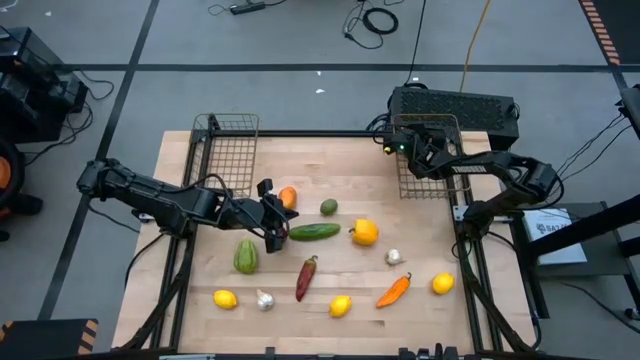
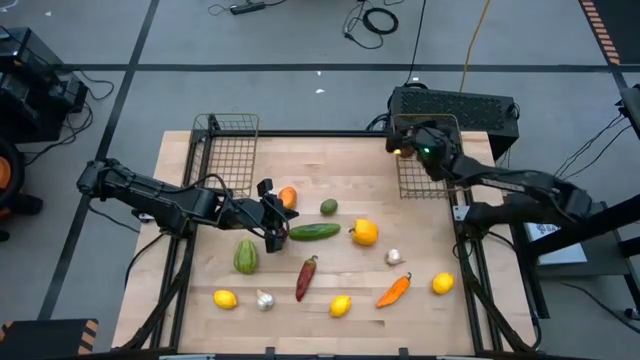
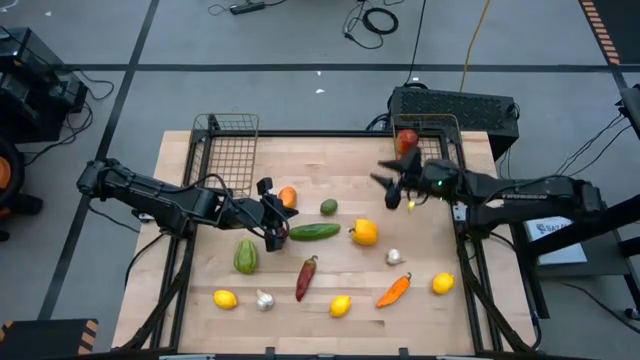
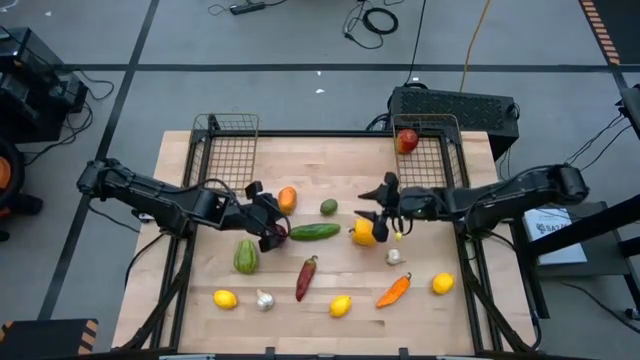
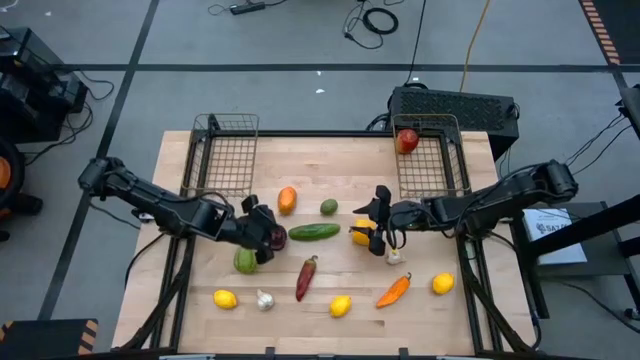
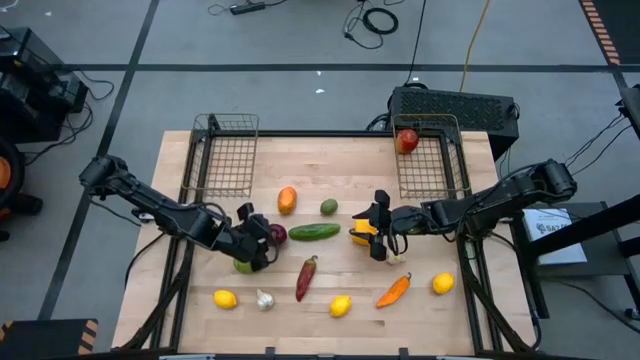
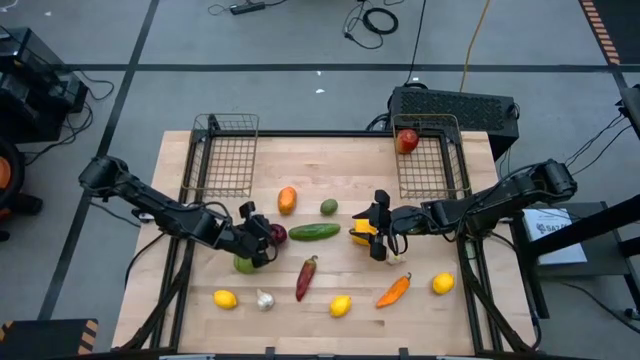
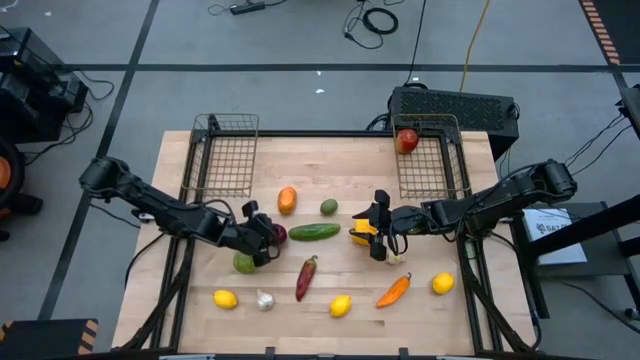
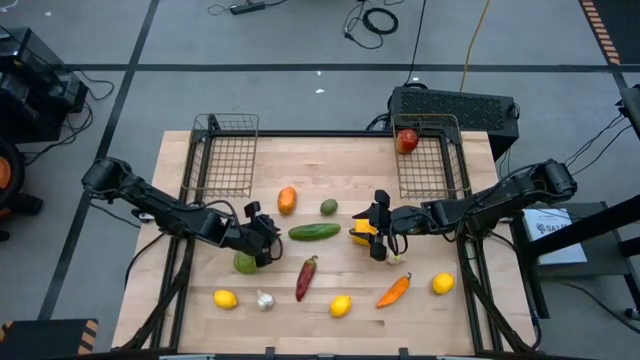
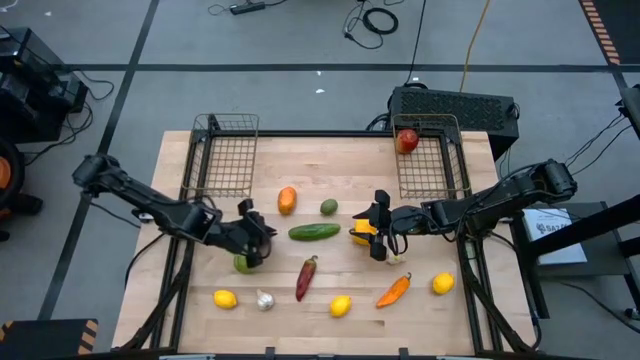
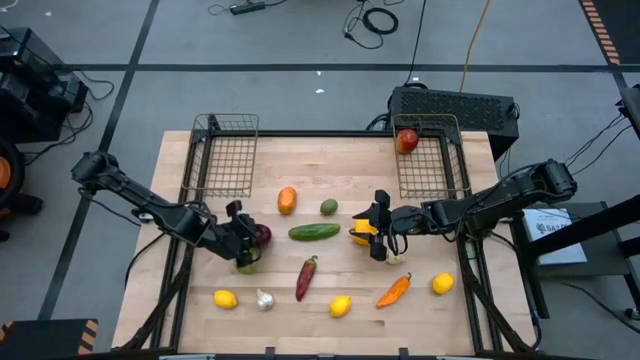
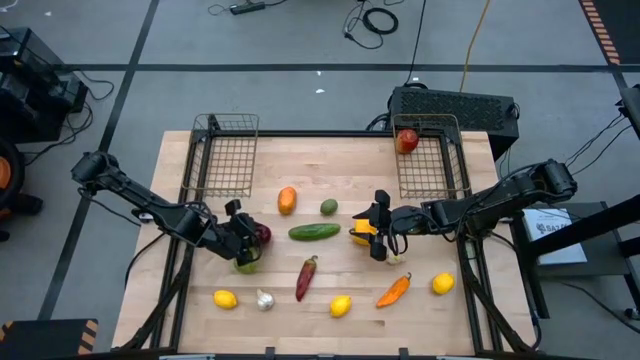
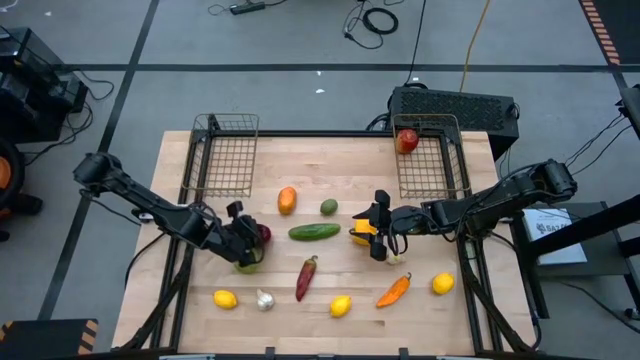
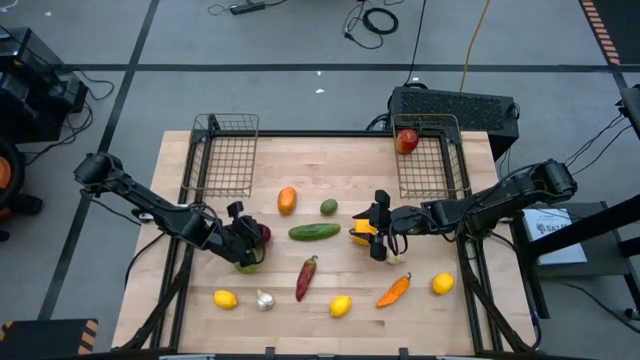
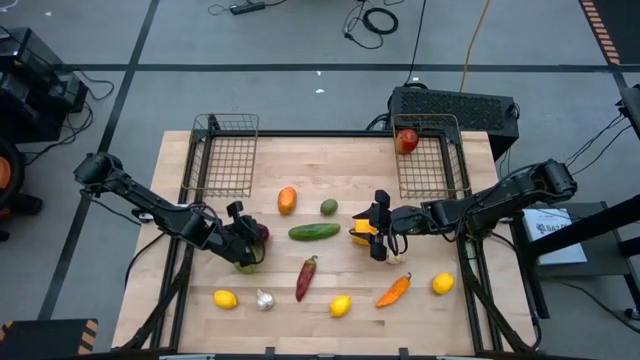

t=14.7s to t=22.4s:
Task: Sort produce into baskets
Put the left red apple into the right wire basket

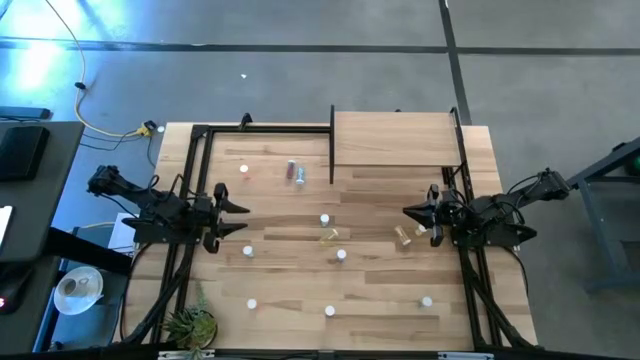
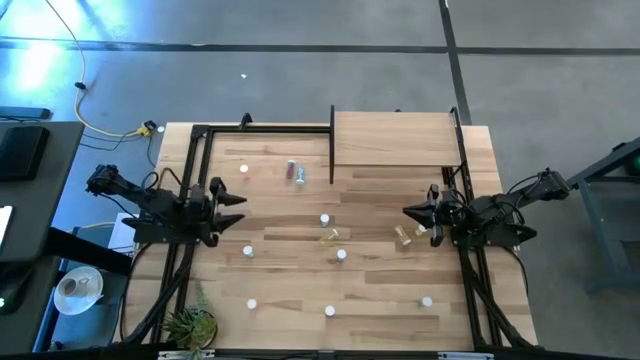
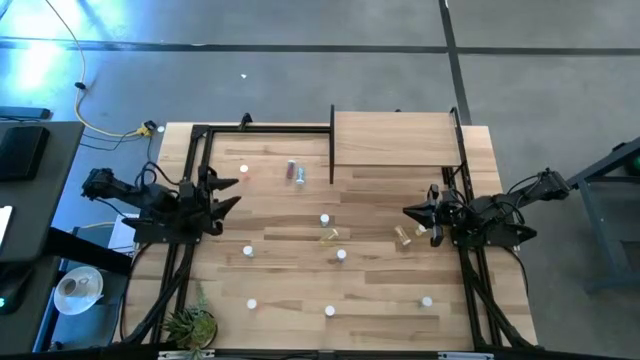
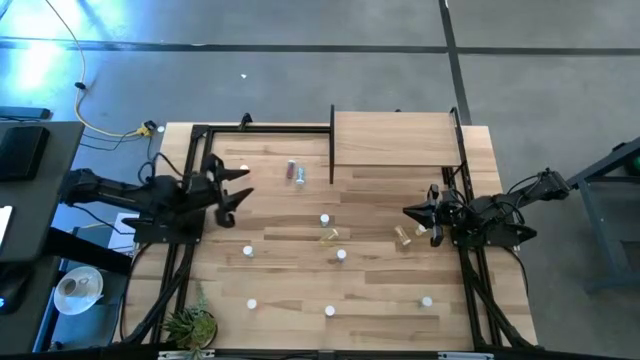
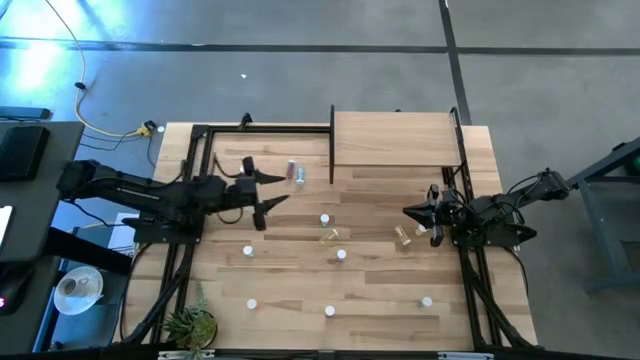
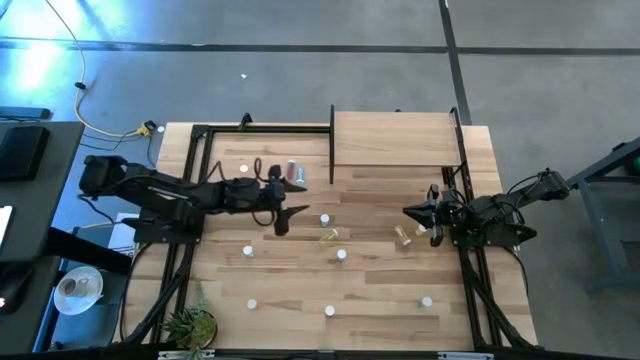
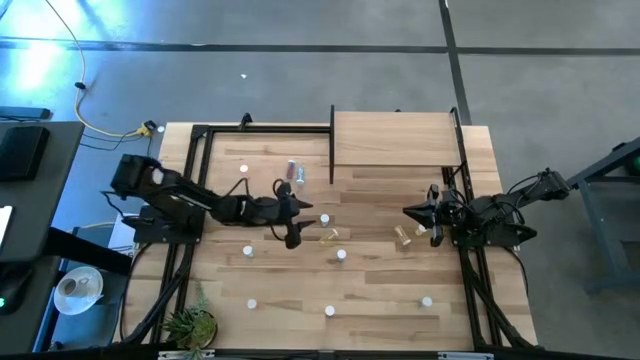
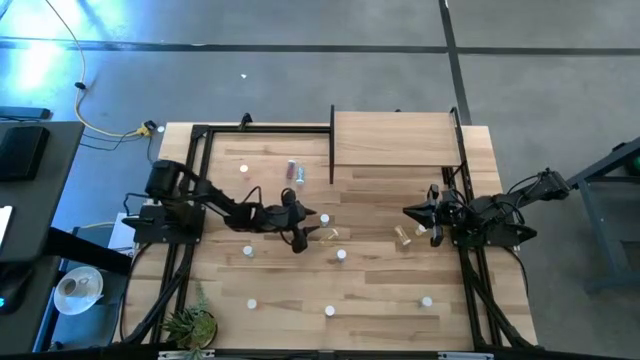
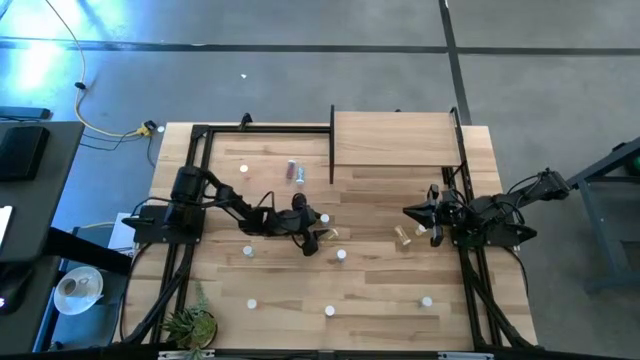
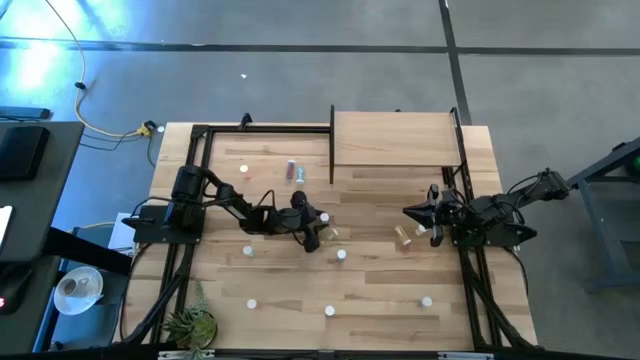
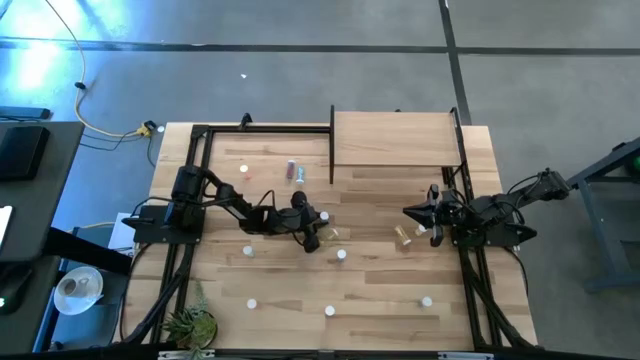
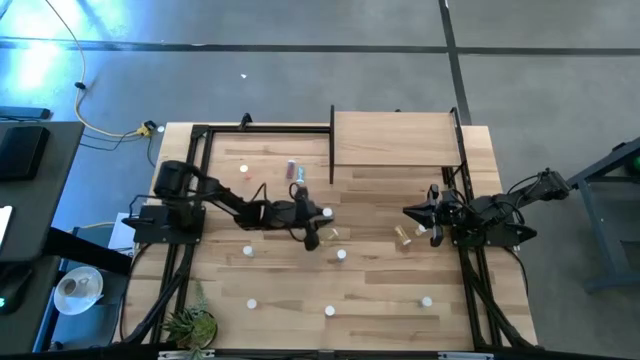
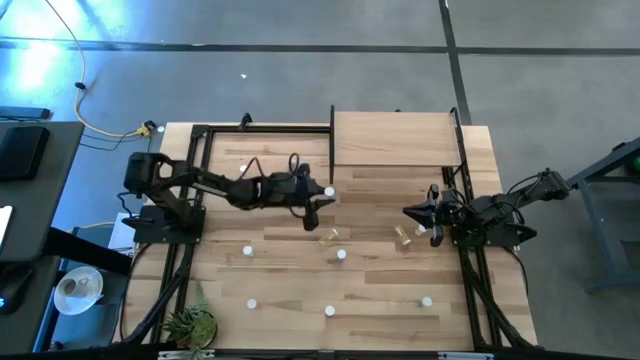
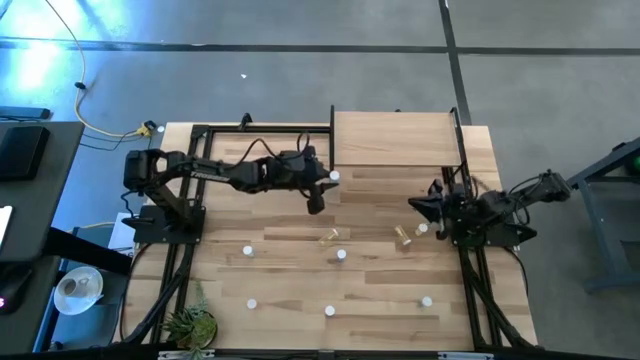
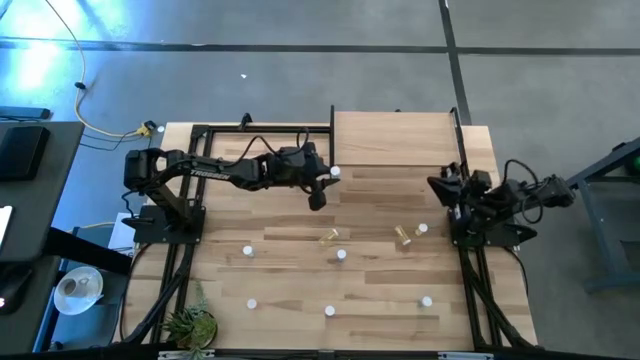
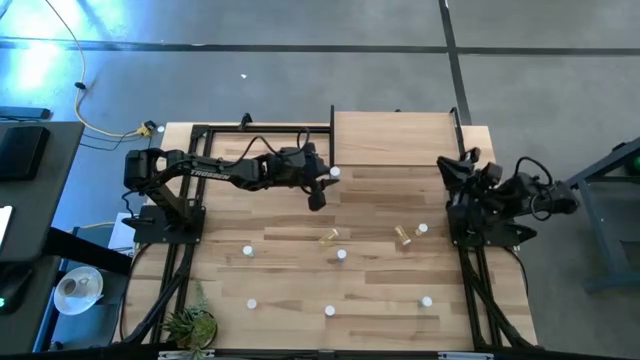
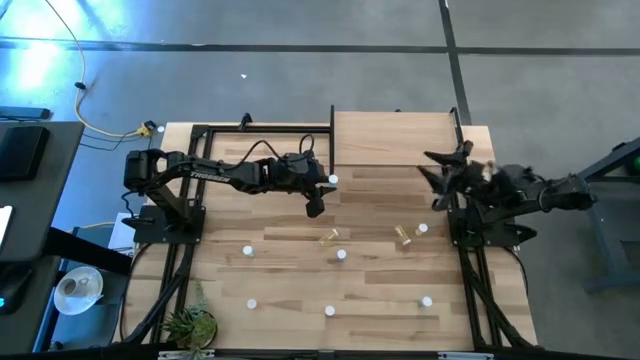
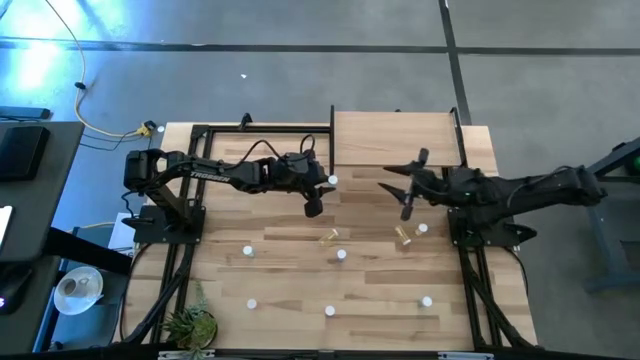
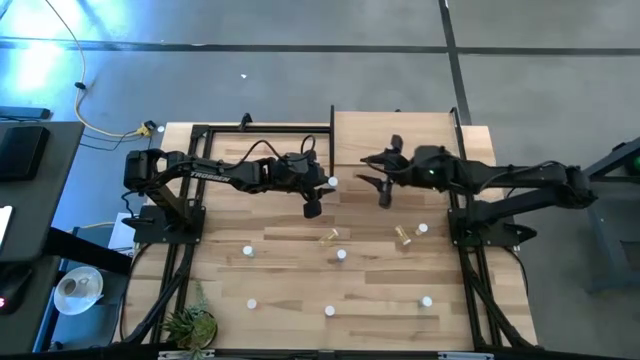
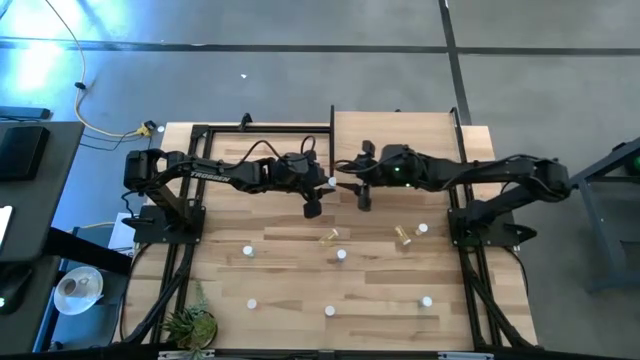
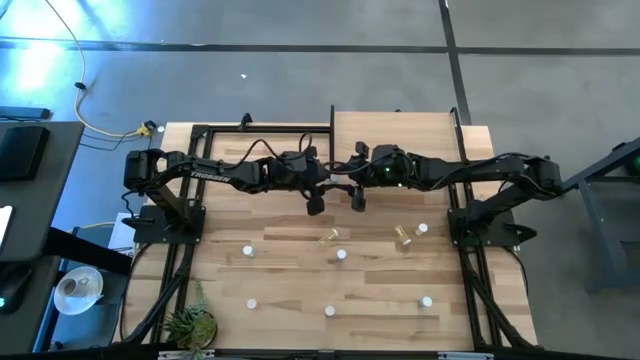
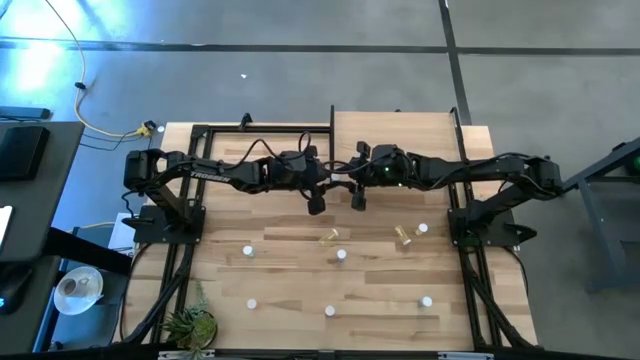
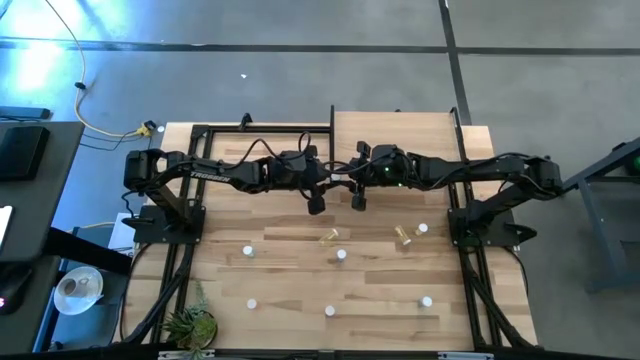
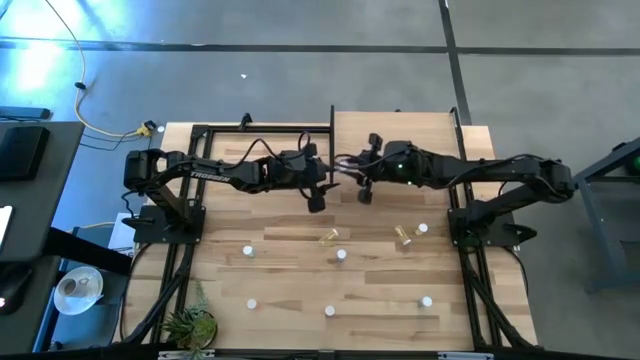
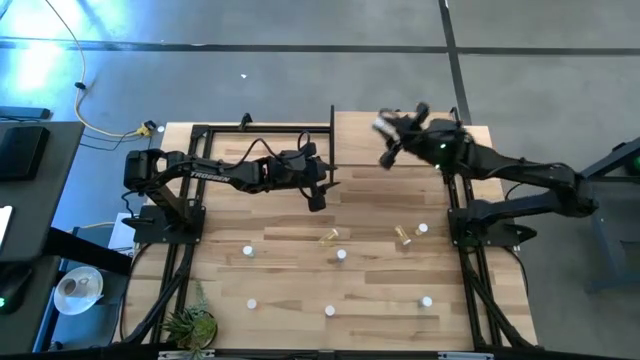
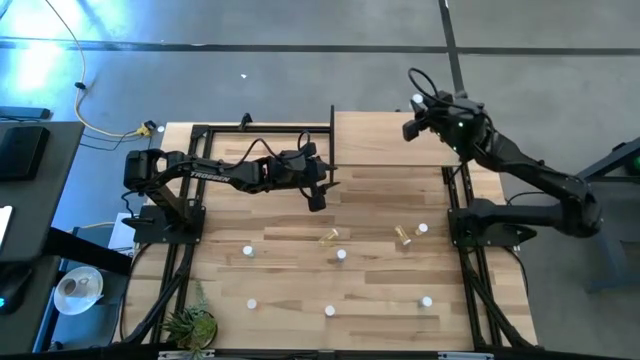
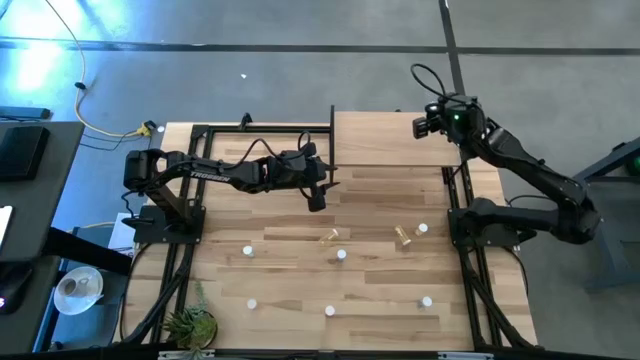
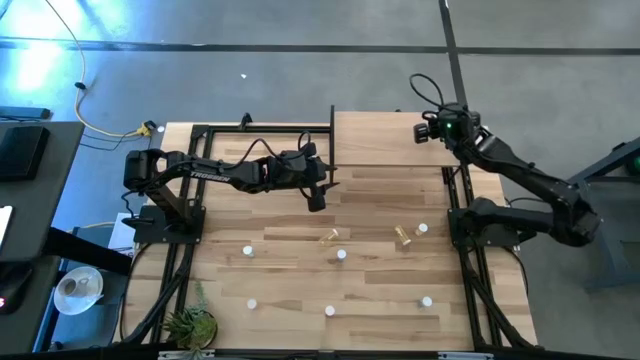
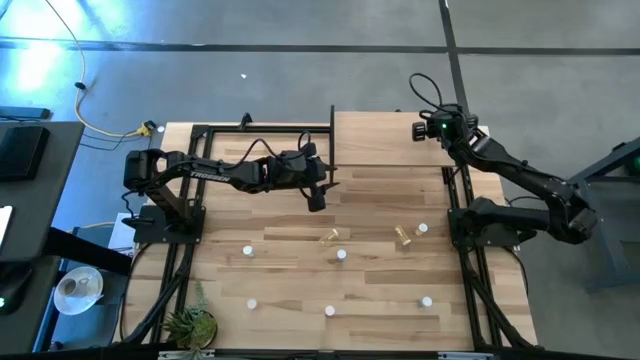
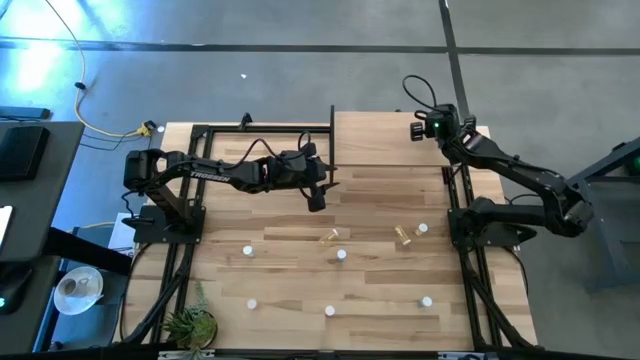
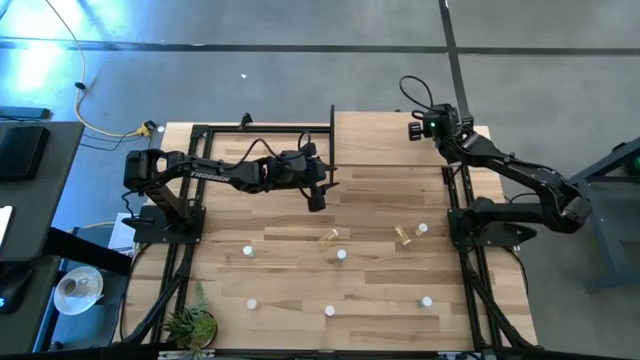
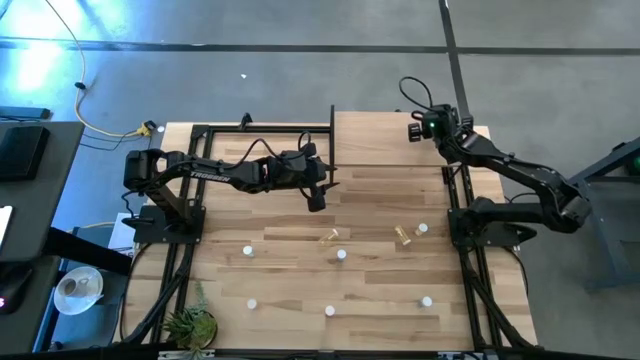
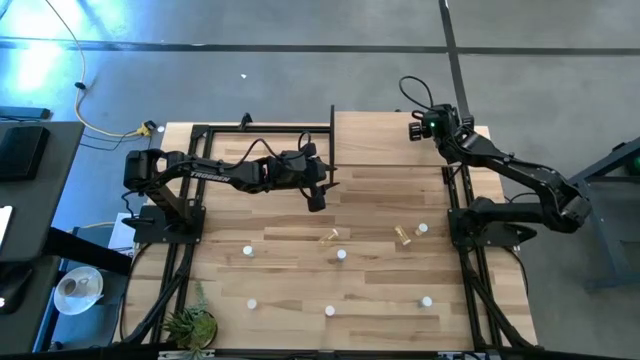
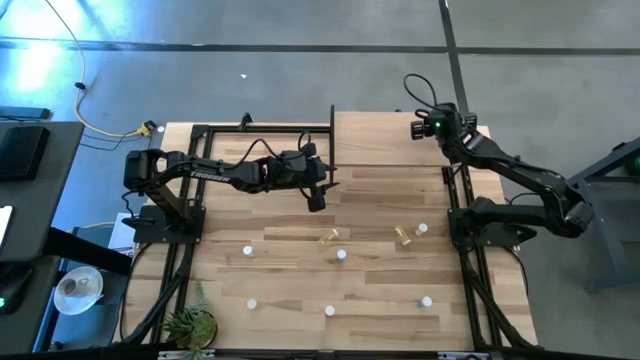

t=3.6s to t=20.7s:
Task: Pick and place medicine bottles onto shelf by color
Put the right light blue medicine bottle on the shelf
